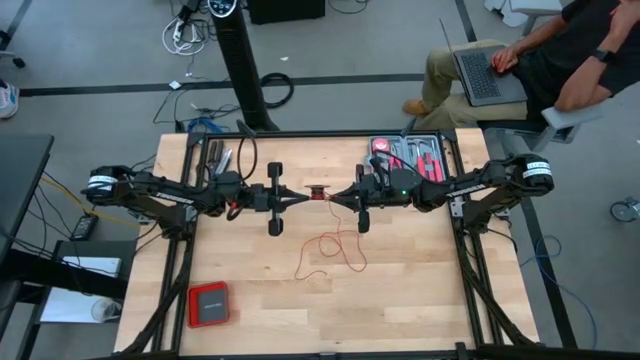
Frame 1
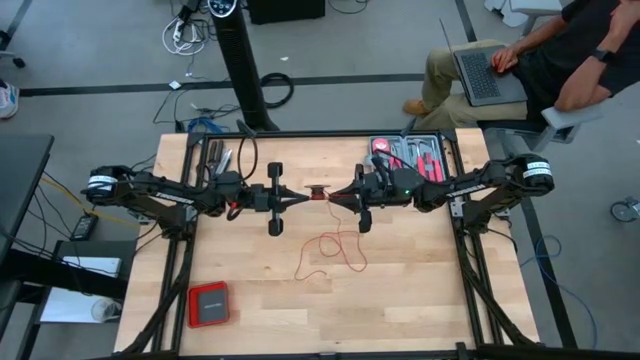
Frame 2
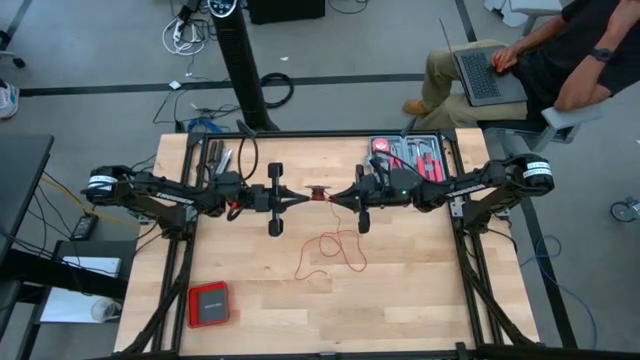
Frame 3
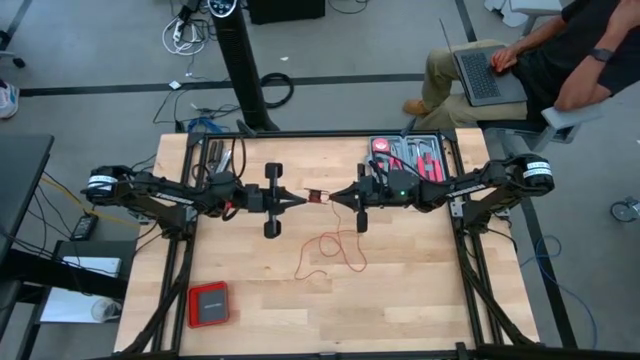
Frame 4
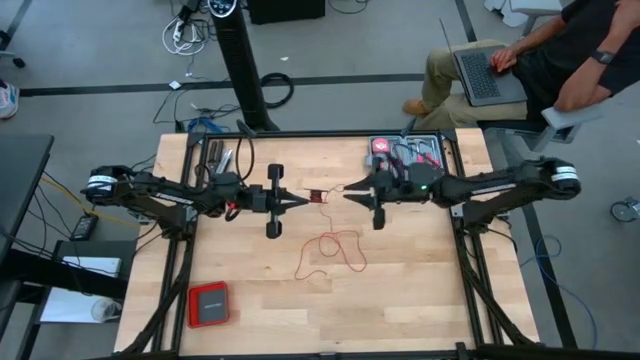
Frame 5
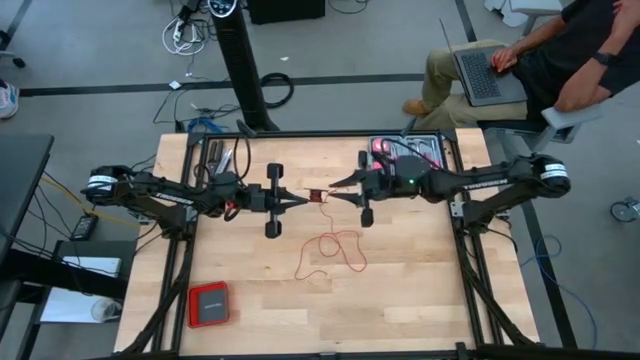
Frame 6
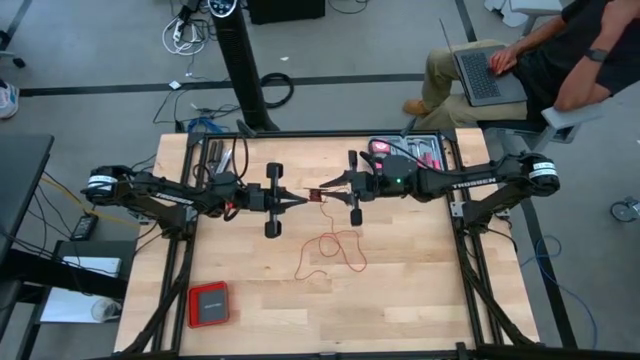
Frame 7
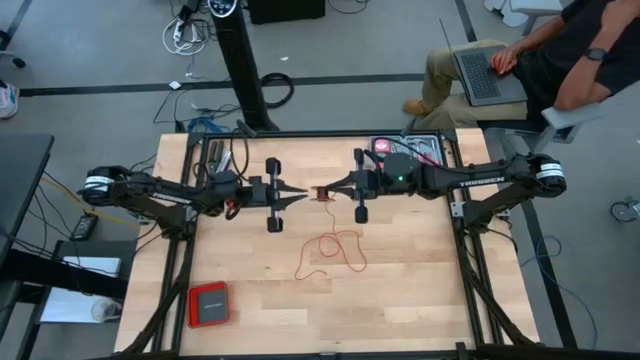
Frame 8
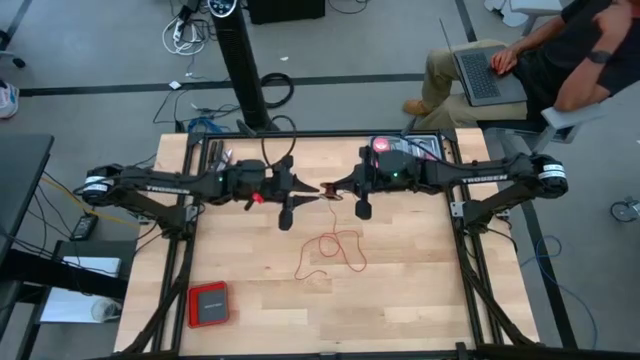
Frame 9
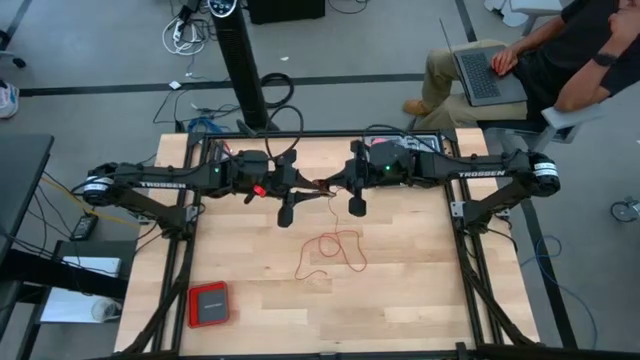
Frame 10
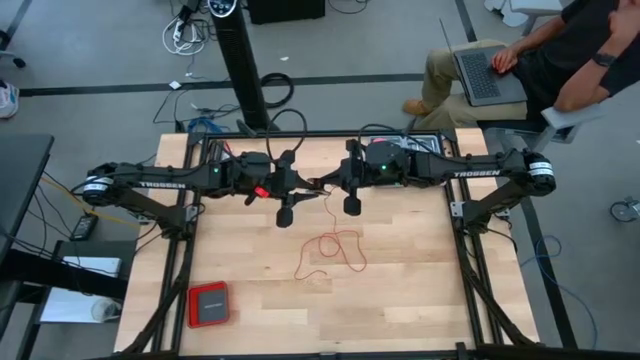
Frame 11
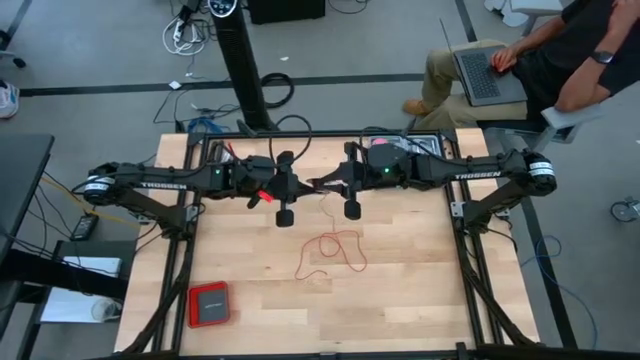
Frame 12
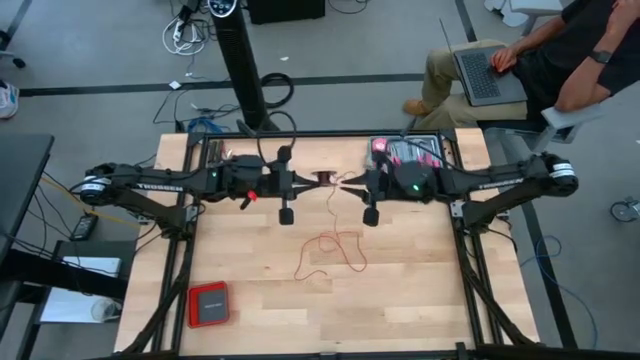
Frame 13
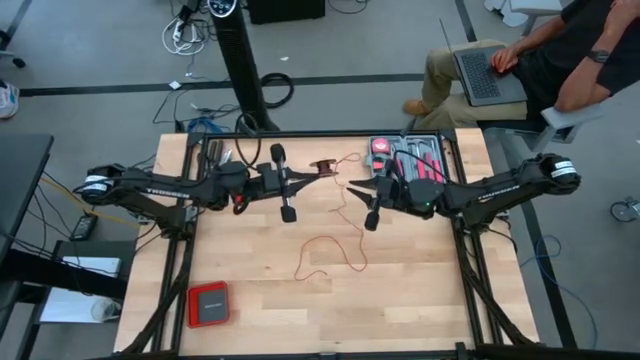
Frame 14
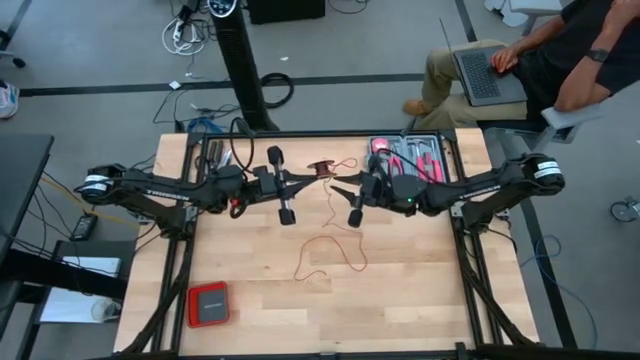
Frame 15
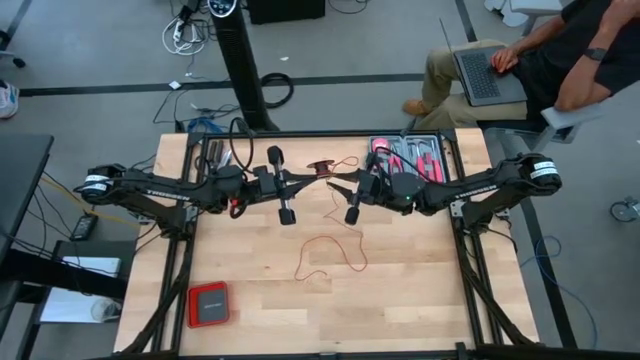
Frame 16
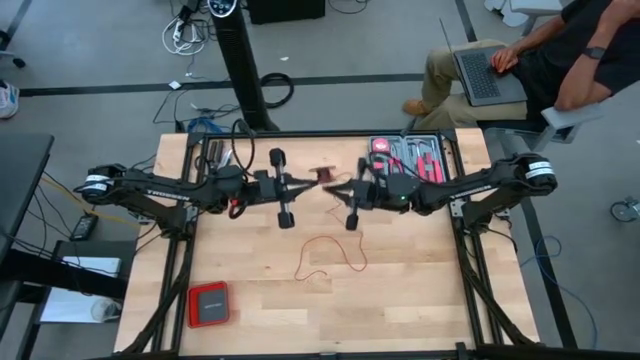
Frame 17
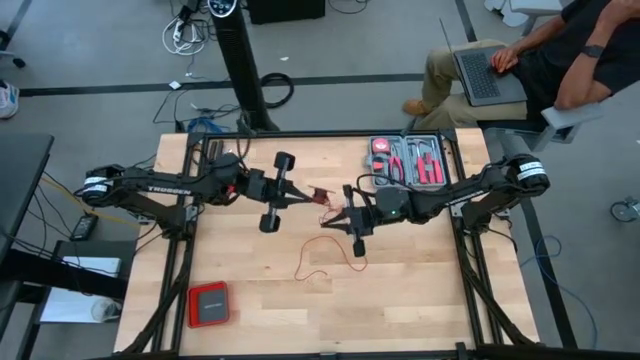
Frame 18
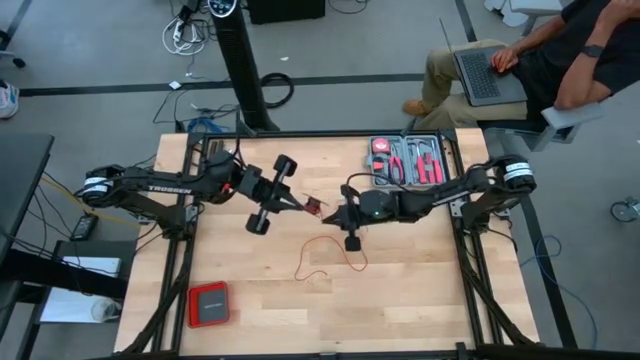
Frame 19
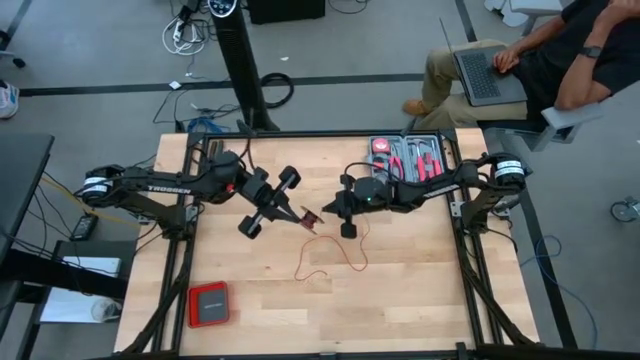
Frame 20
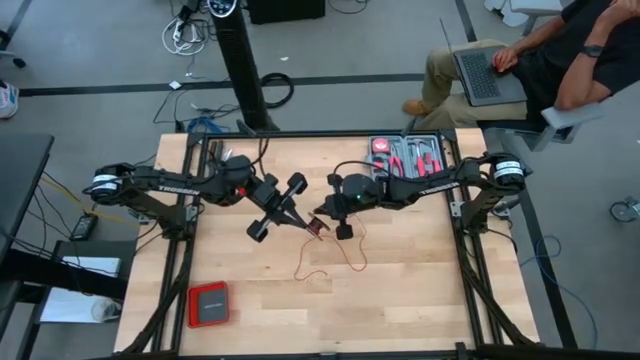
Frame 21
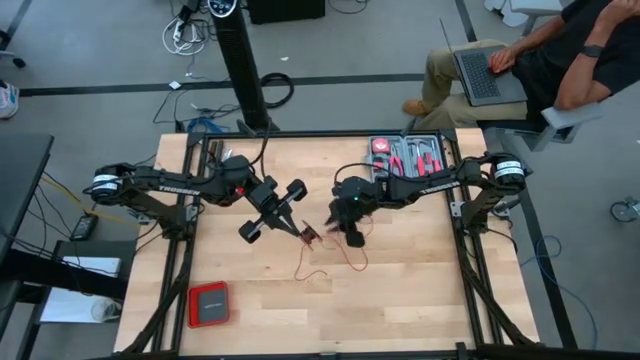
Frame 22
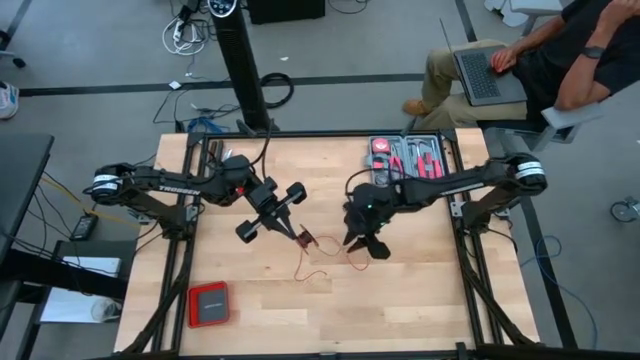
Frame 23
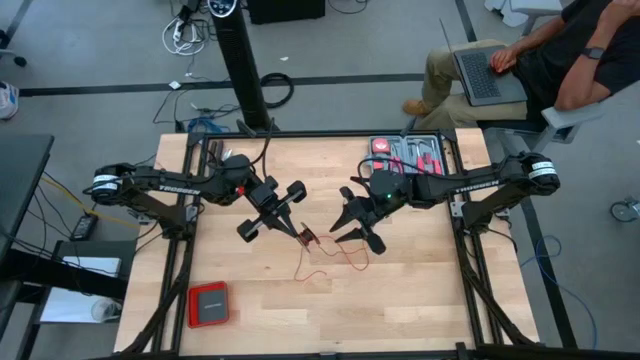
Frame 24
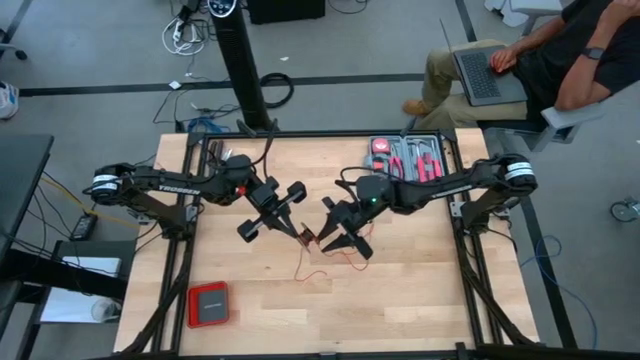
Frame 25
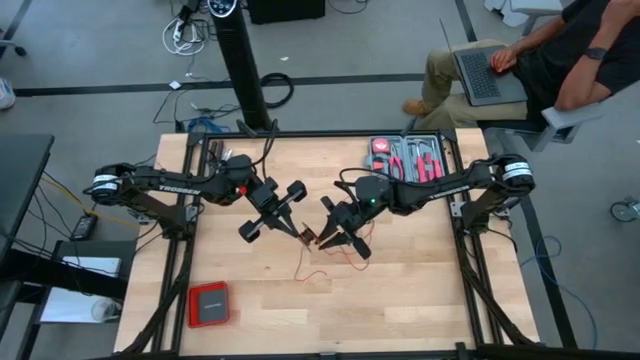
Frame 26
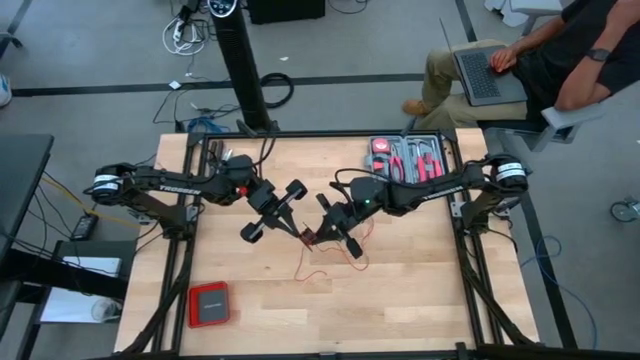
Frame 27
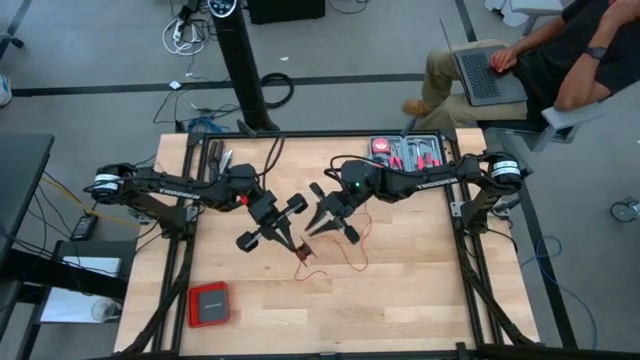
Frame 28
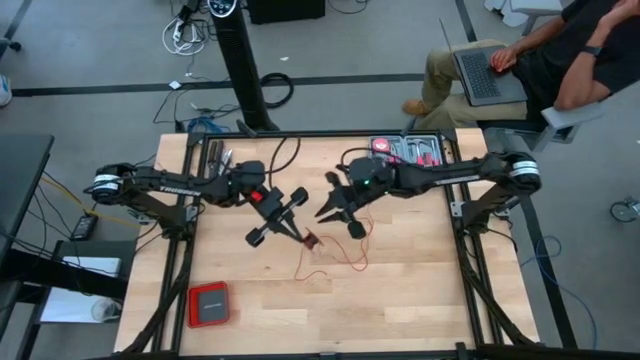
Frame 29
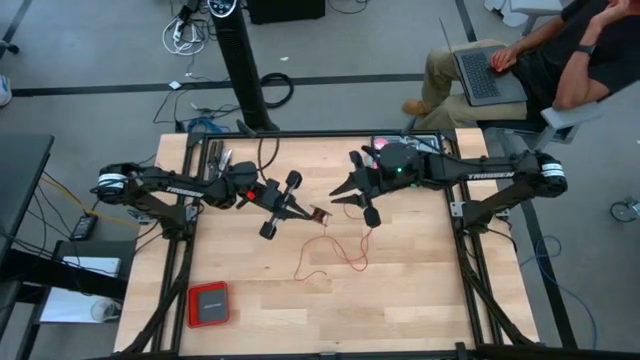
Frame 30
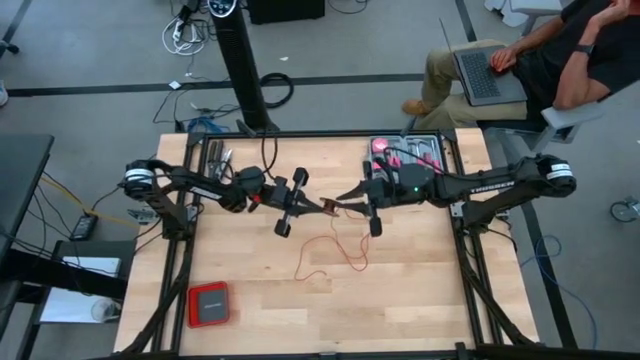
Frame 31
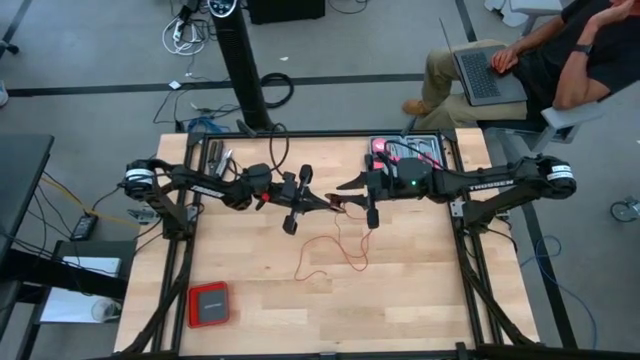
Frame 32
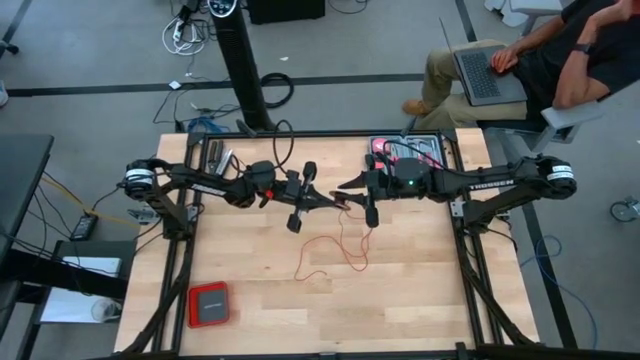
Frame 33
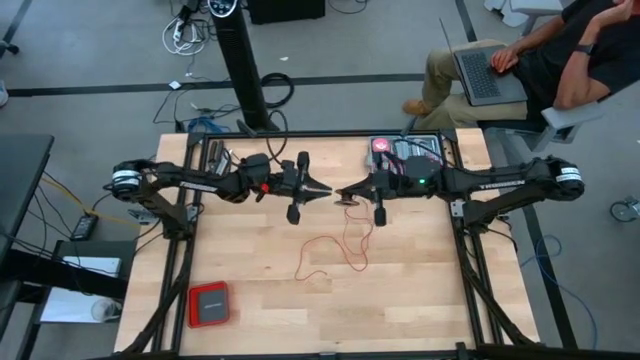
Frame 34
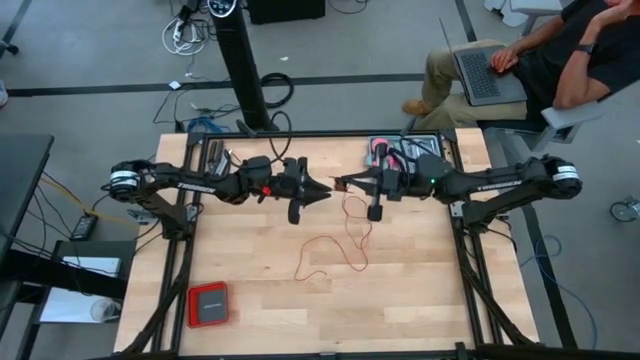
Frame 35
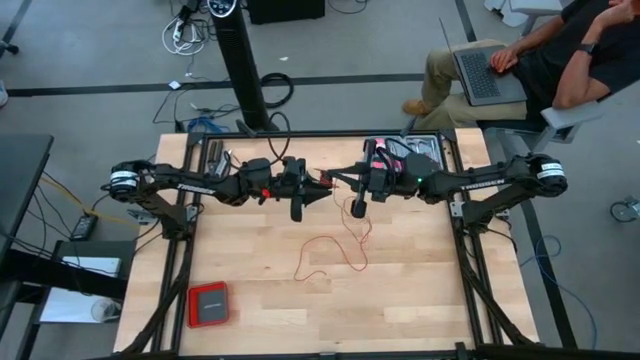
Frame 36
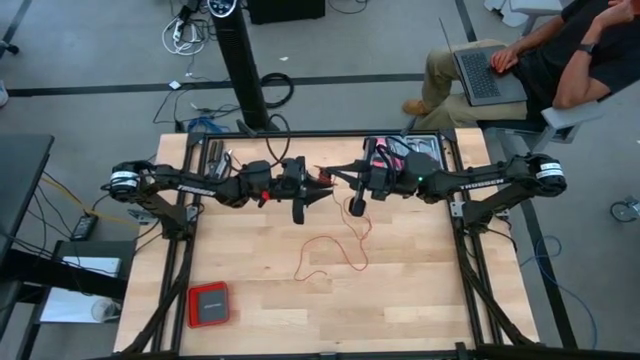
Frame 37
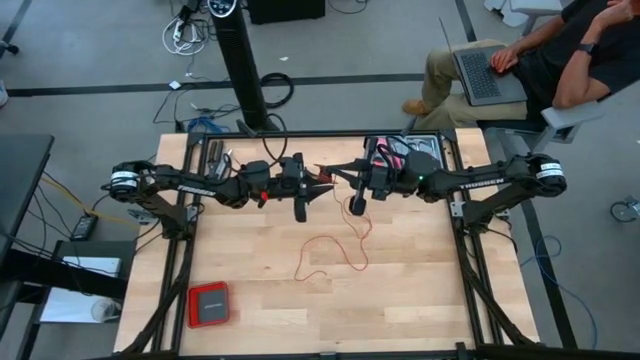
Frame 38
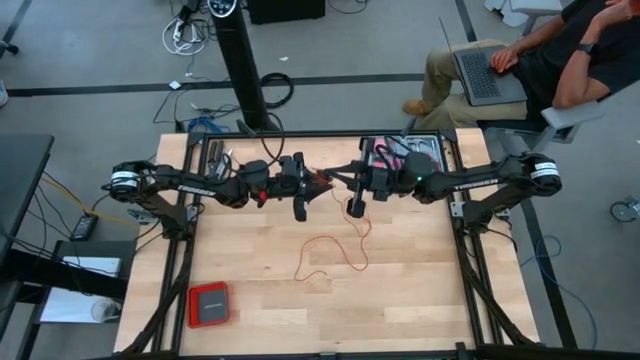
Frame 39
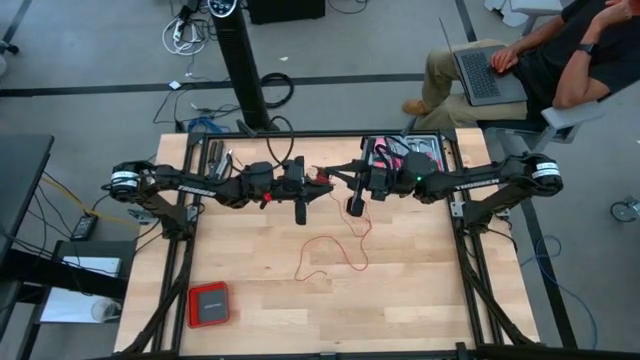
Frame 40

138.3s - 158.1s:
Task: Coil cords
Coil the red cable wire onto the black spool

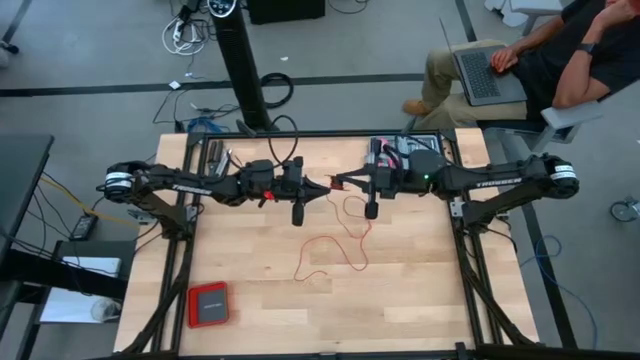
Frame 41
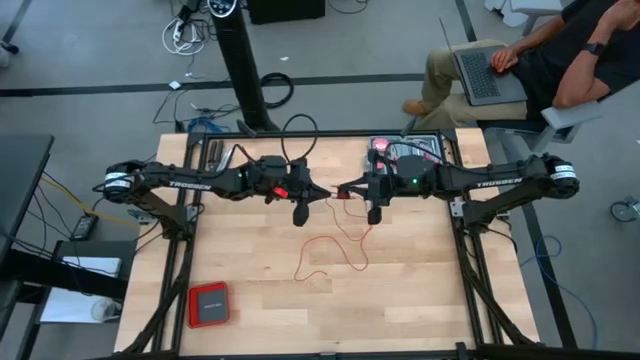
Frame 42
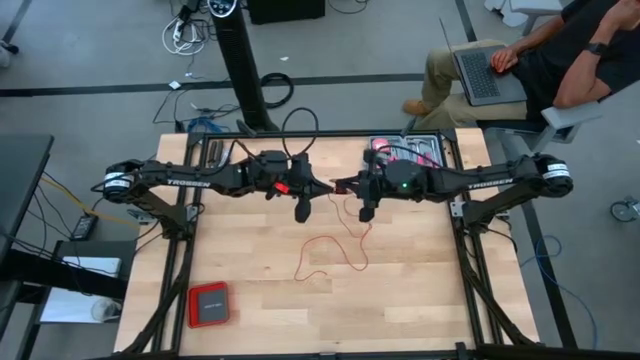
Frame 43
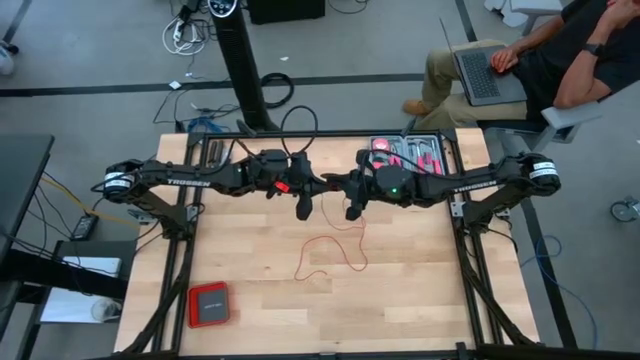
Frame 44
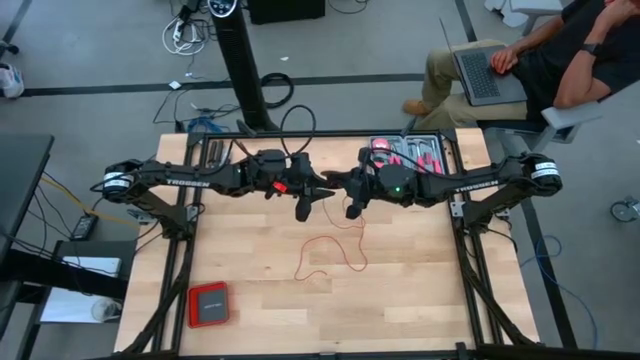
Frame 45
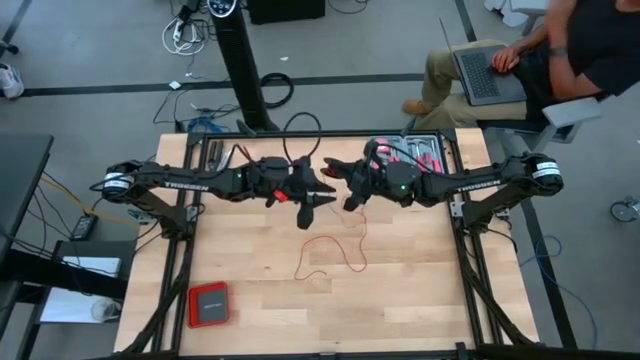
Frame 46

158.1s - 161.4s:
Coil the red cable wire onto the black spool
